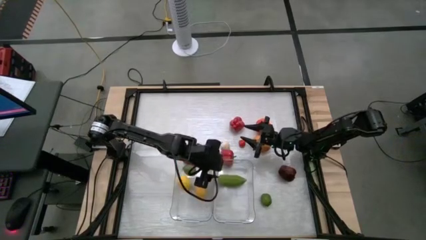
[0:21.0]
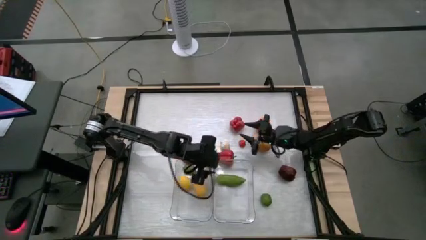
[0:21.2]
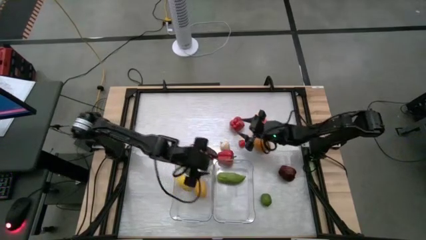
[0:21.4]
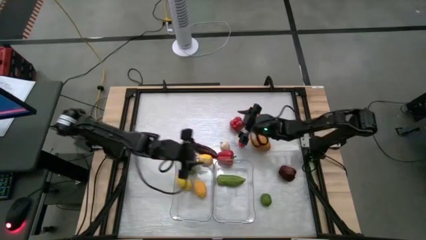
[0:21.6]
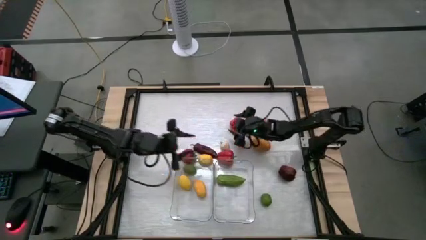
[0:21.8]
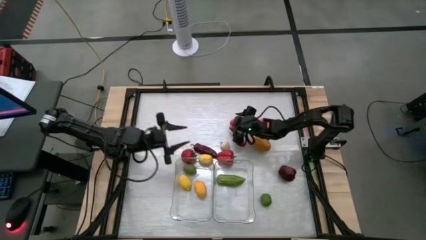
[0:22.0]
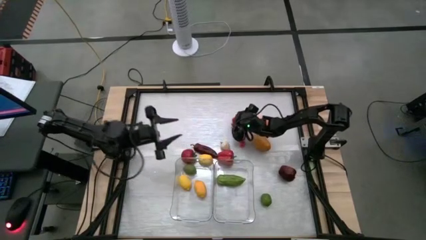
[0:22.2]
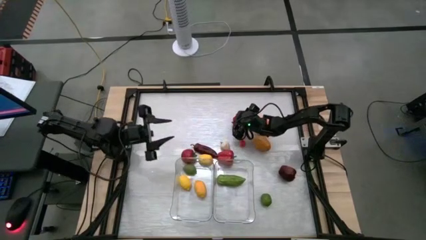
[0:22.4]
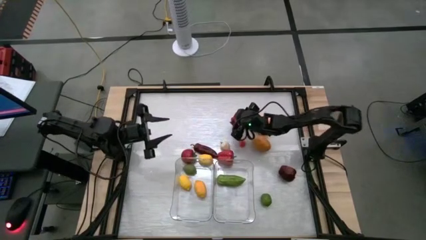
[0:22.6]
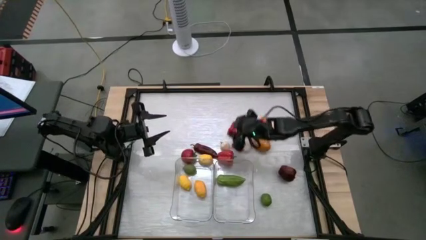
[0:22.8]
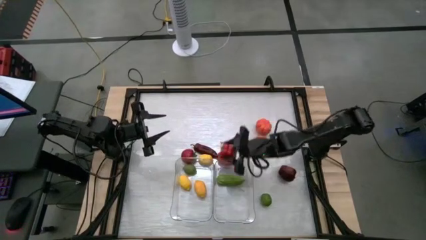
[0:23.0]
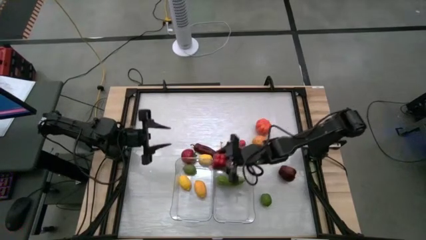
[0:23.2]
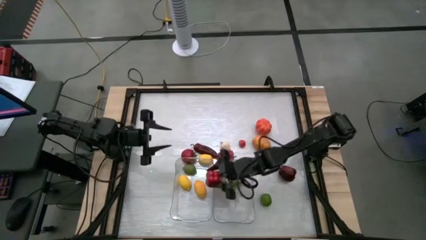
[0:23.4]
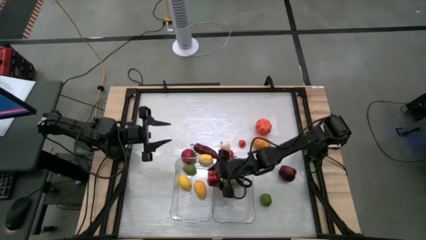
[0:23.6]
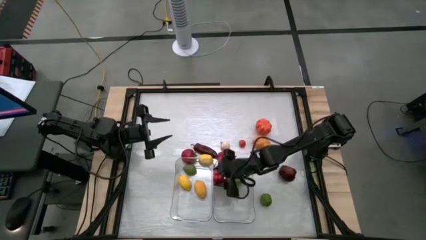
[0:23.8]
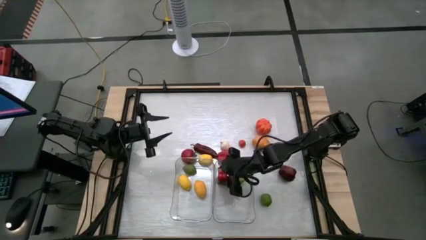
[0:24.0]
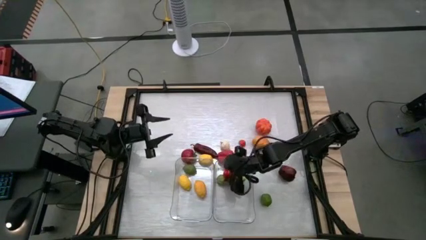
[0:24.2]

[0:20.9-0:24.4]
Task: Sort produce into baskets
Put the top bell pepper into the right transparent bin

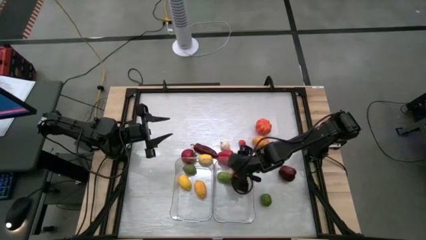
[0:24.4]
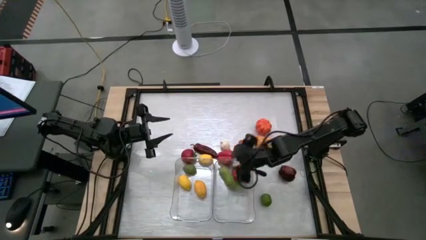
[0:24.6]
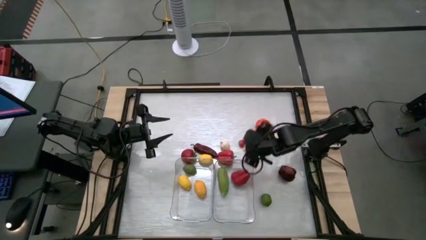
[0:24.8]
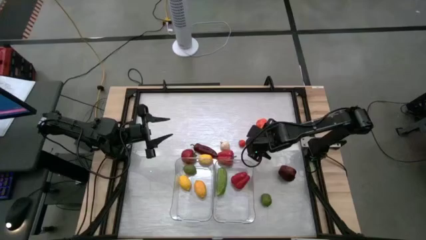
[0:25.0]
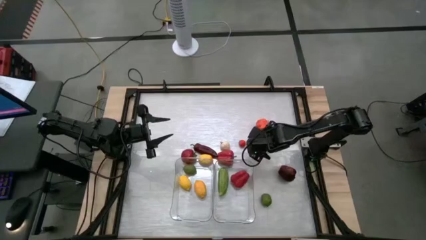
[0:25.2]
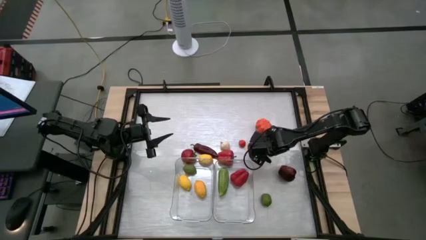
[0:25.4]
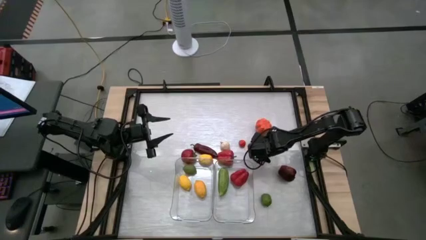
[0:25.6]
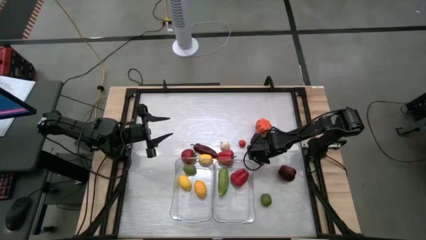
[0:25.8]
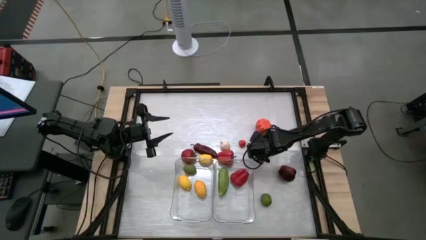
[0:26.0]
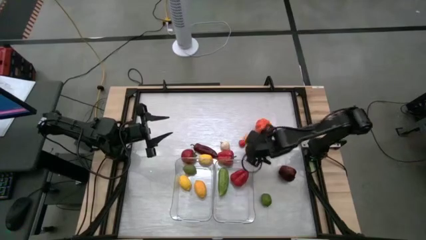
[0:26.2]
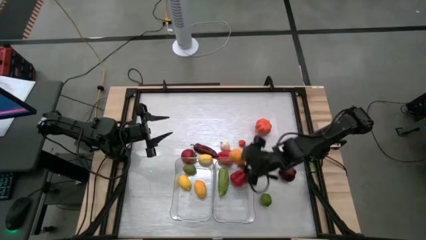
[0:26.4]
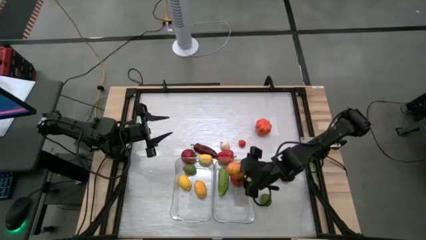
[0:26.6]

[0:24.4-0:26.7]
Put the potato into the right transparent bin

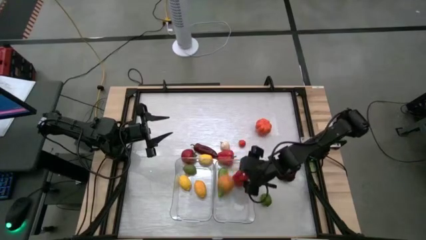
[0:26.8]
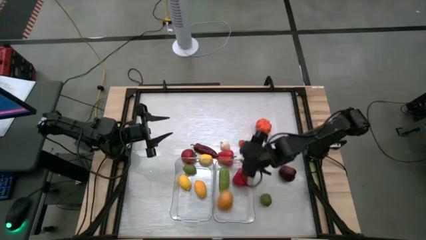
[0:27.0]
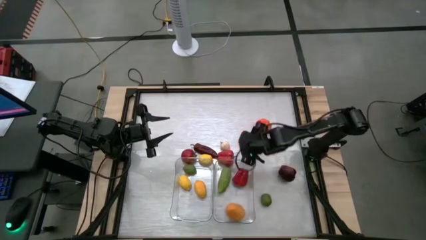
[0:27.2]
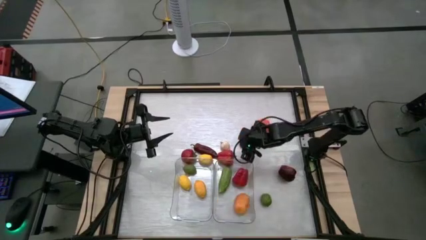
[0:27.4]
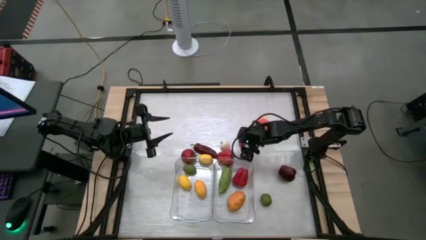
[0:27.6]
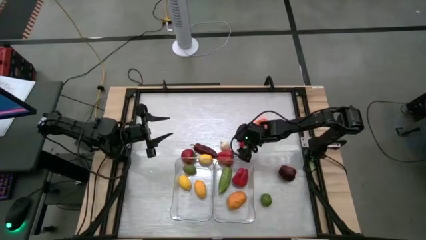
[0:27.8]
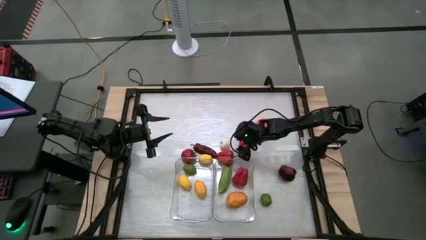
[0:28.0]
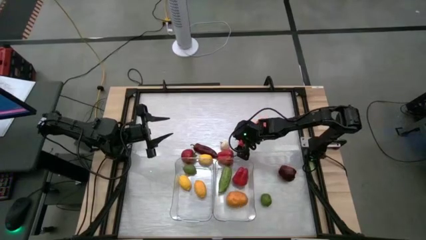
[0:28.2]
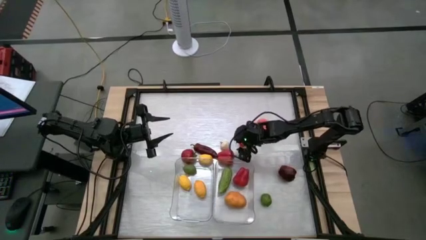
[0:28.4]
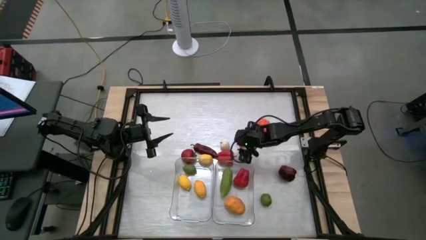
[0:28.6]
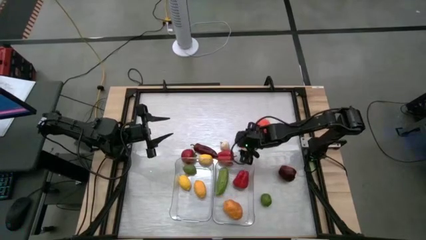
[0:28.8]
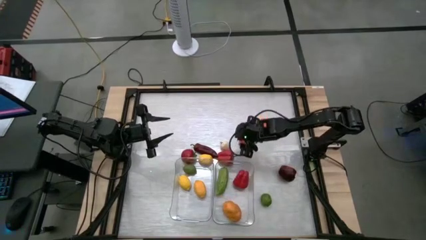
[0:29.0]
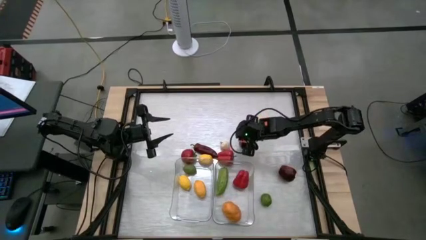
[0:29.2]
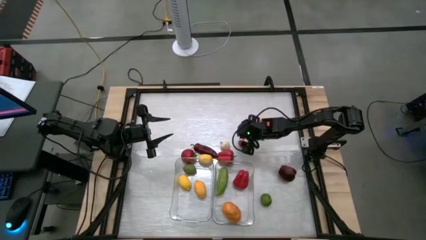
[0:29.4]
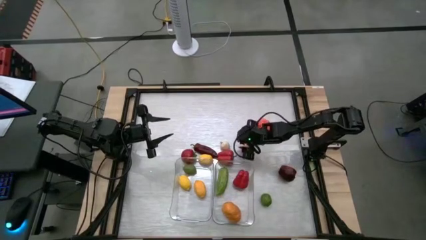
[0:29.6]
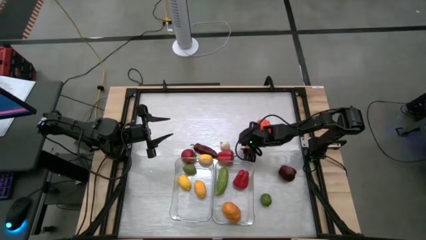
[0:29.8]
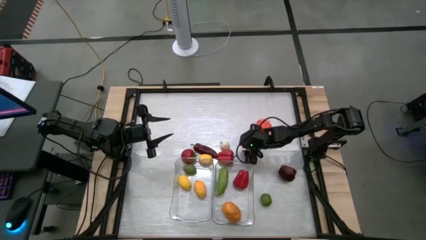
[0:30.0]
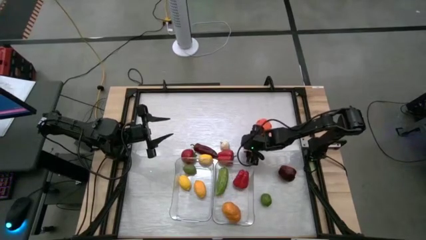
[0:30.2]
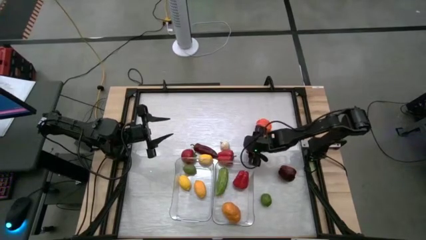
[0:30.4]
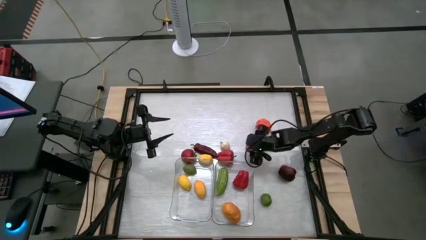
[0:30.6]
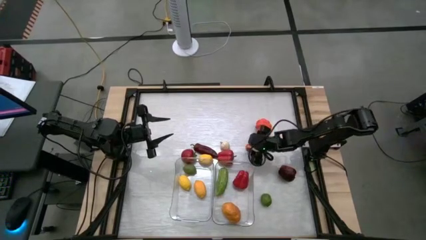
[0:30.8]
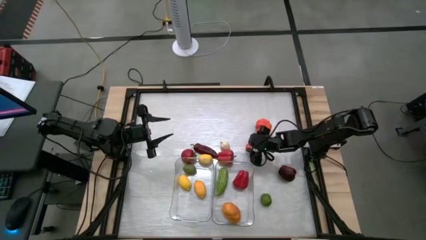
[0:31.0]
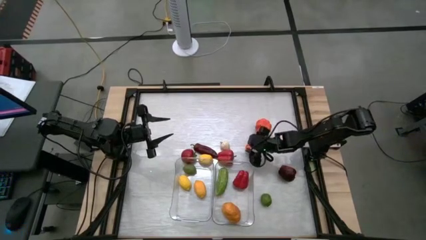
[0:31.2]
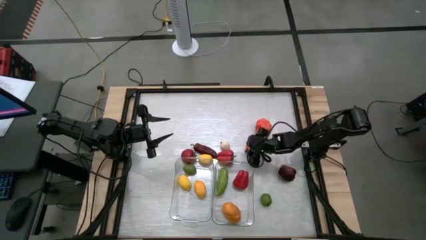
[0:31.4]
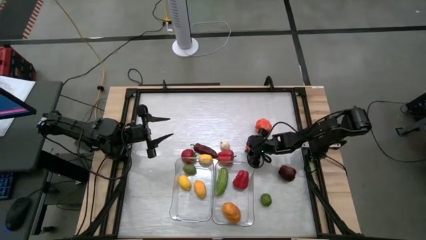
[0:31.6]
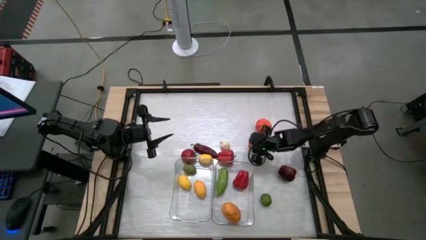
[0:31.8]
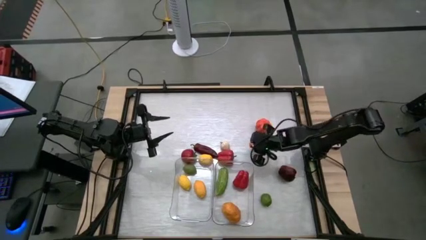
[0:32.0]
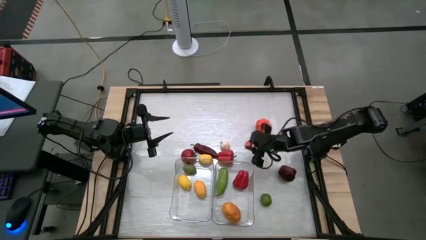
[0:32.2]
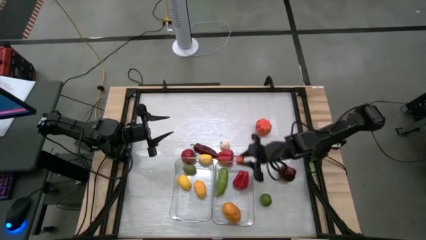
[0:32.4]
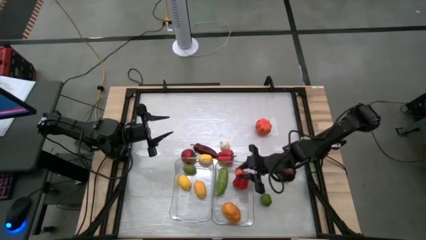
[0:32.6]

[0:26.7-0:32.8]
Put the persimmon into the right transparent bin

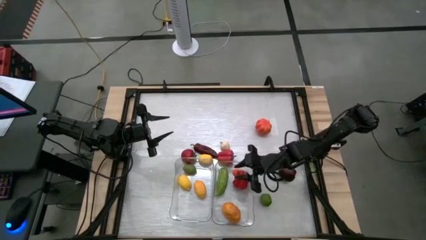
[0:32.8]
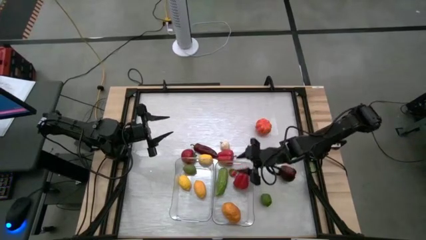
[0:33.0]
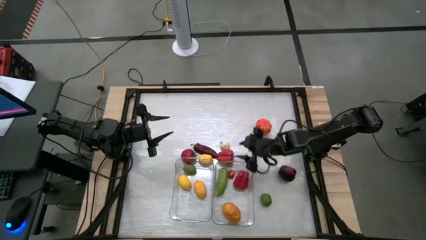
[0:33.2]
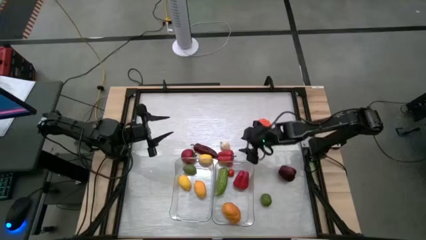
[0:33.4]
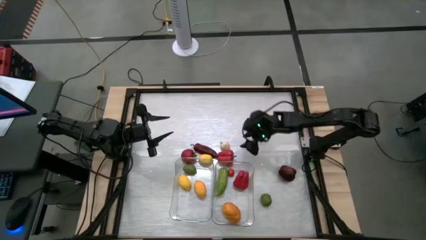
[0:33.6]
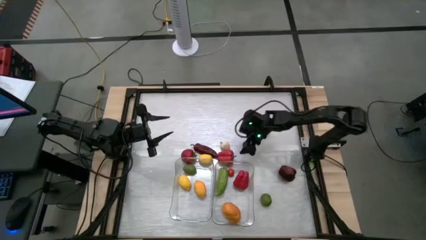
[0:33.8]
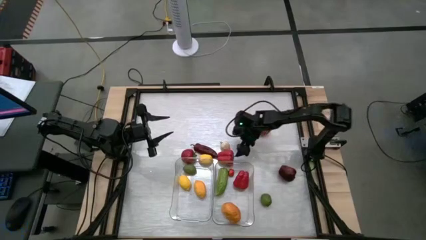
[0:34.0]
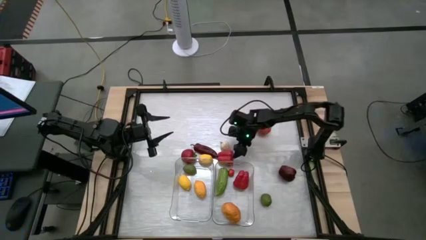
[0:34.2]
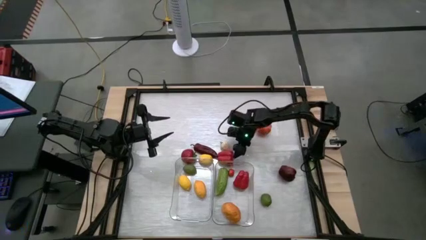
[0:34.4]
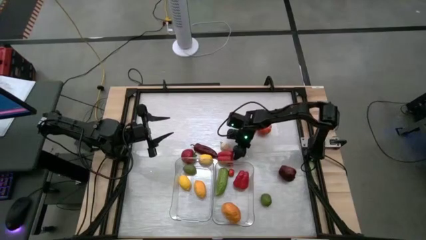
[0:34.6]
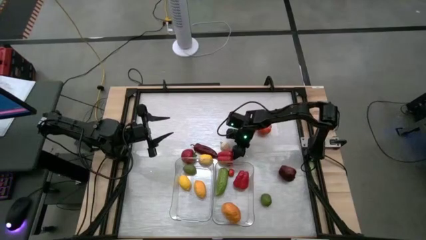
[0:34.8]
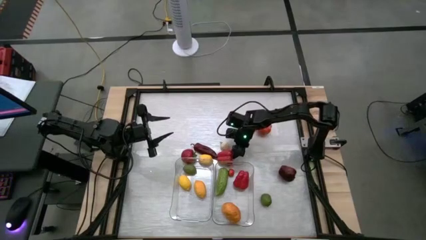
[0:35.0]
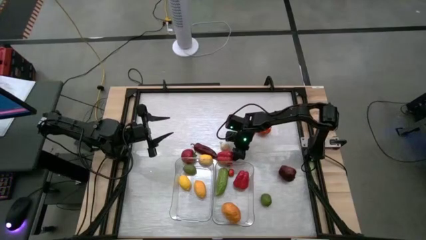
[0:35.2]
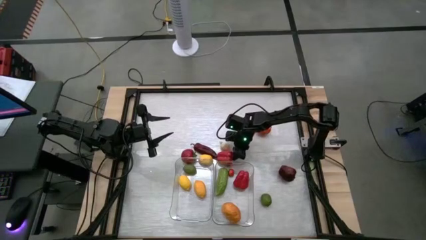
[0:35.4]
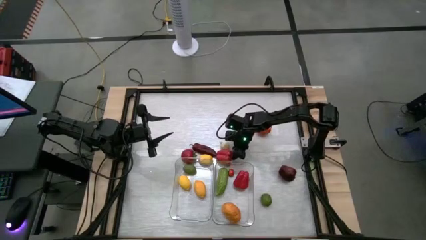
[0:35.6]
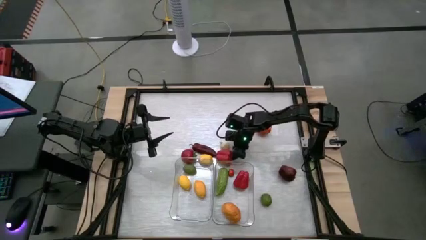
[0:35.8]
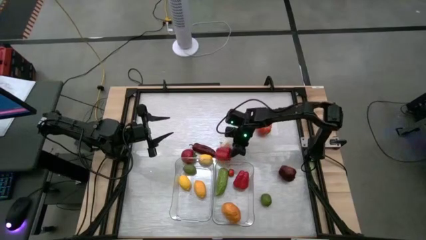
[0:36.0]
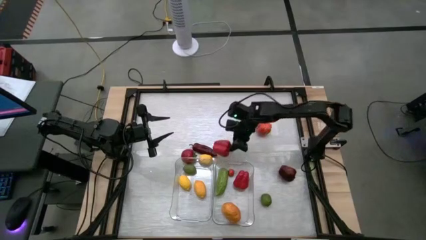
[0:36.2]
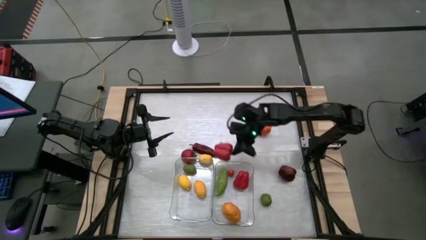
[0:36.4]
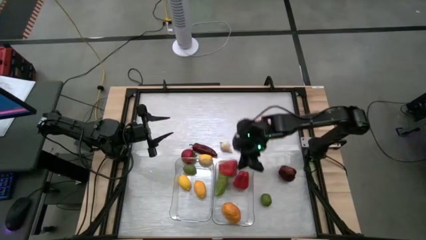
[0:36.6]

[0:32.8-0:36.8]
Put the bell pepper into the right transparent bin

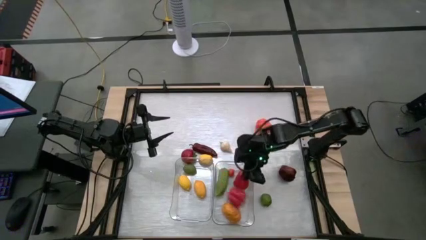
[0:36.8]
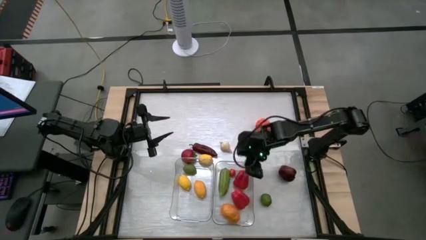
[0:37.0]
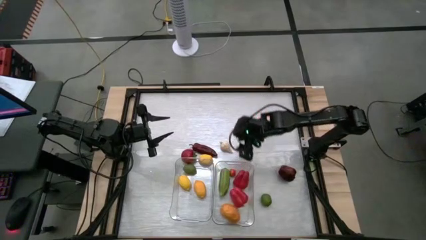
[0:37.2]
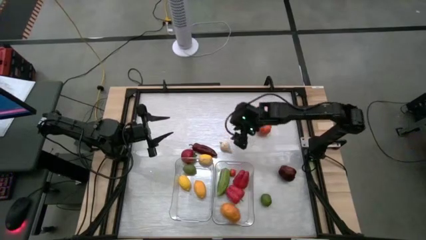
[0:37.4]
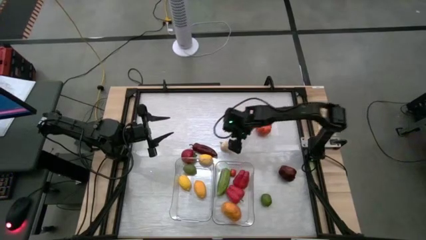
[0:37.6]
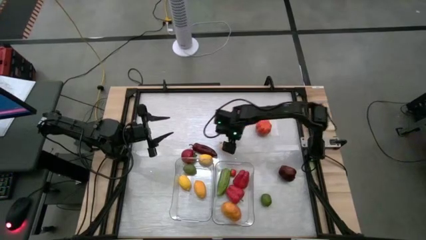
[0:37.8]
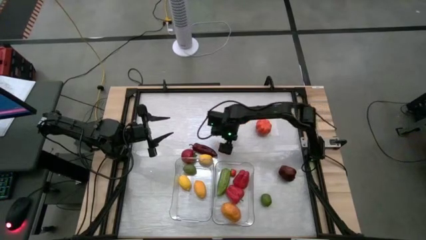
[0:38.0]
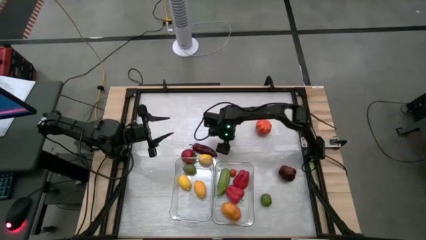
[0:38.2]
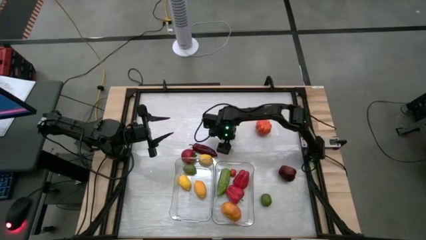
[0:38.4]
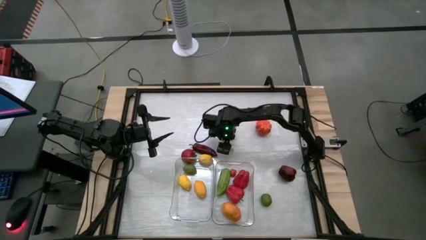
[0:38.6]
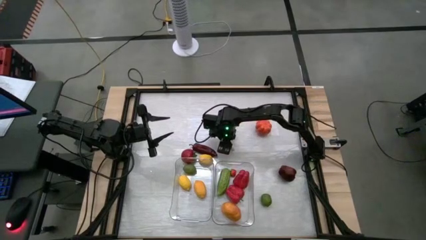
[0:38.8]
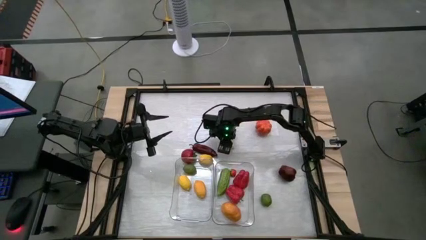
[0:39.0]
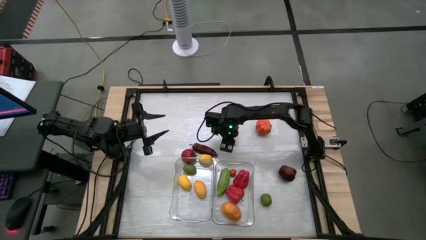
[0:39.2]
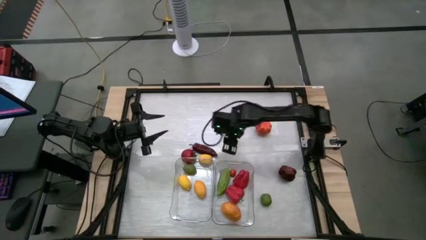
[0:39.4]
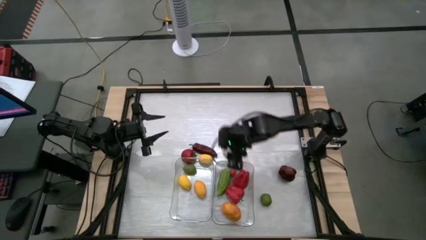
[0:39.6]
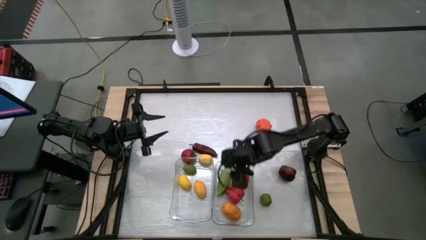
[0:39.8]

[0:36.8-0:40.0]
Put the garlic into the right transparent bin
